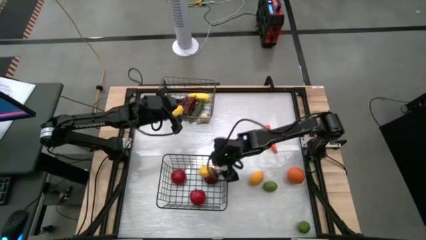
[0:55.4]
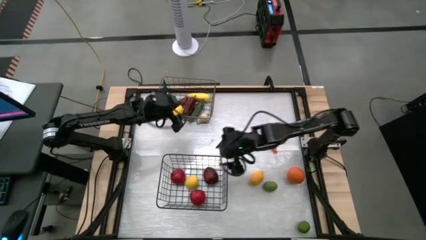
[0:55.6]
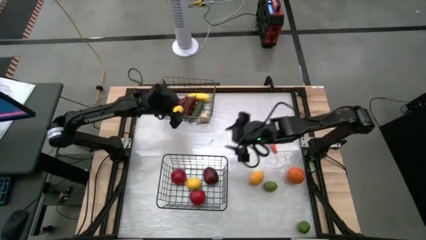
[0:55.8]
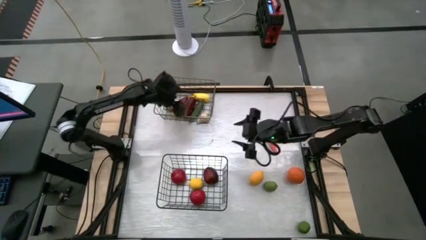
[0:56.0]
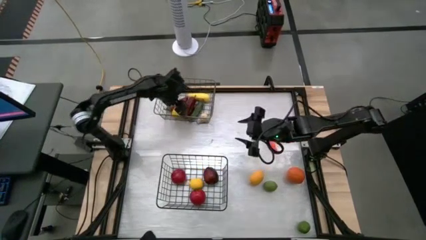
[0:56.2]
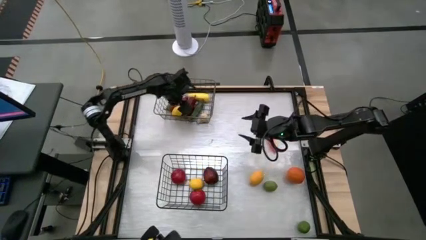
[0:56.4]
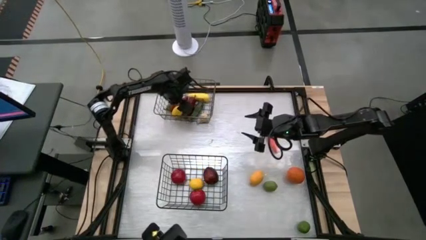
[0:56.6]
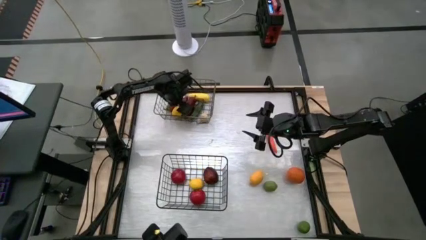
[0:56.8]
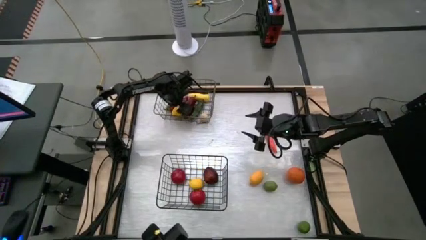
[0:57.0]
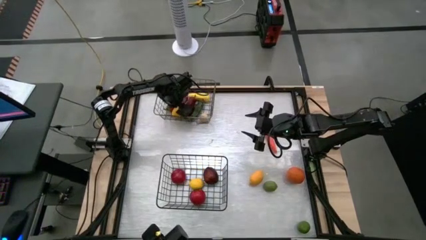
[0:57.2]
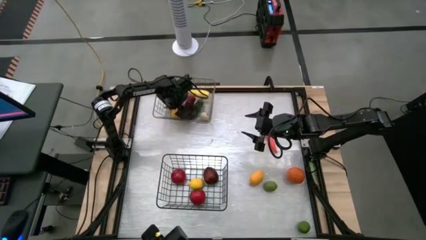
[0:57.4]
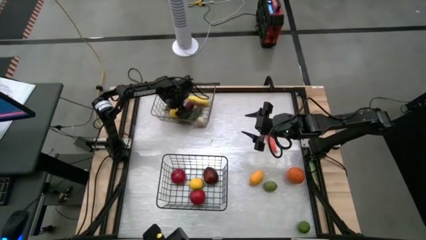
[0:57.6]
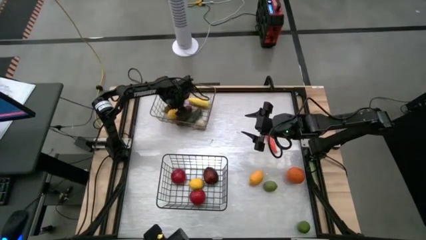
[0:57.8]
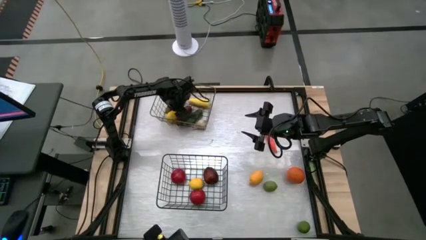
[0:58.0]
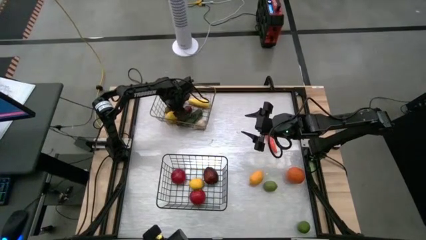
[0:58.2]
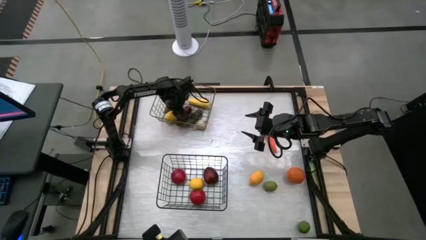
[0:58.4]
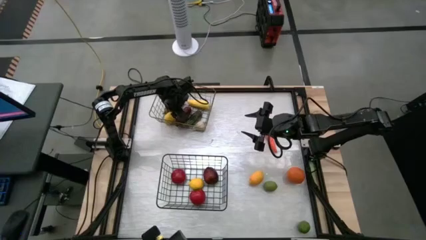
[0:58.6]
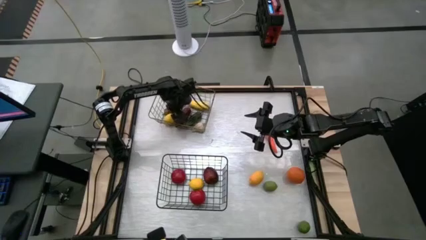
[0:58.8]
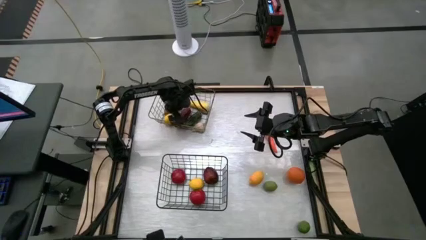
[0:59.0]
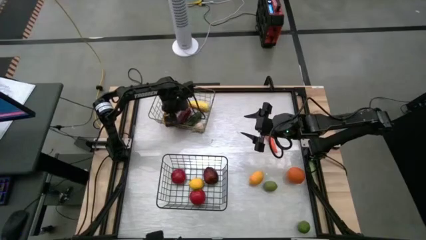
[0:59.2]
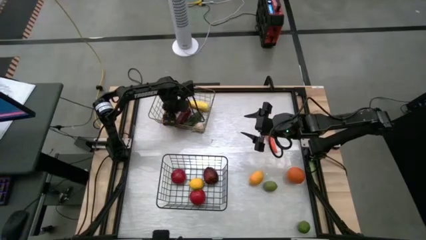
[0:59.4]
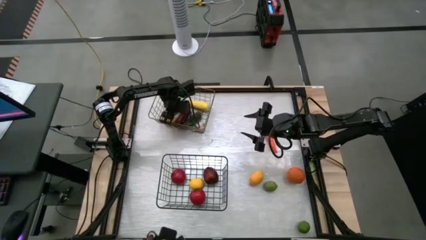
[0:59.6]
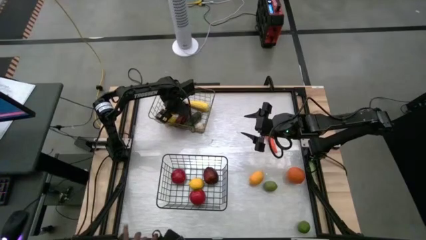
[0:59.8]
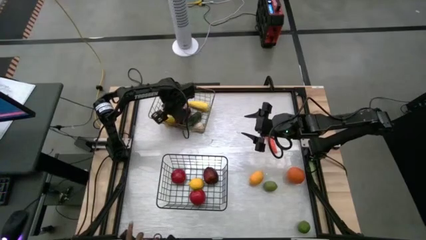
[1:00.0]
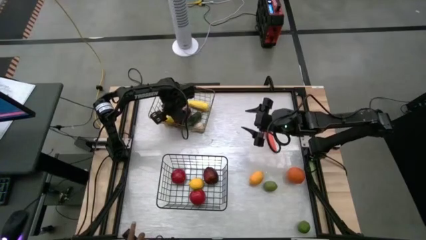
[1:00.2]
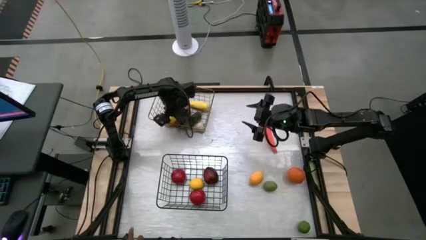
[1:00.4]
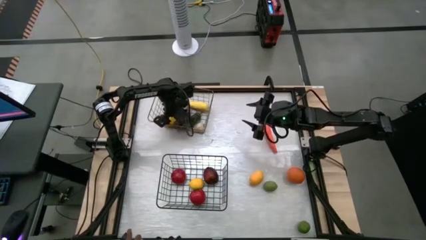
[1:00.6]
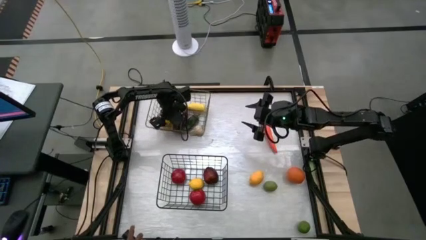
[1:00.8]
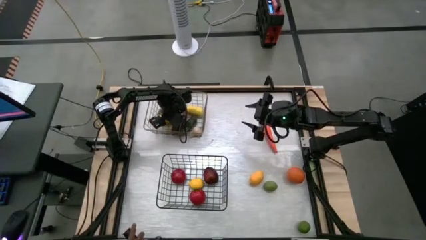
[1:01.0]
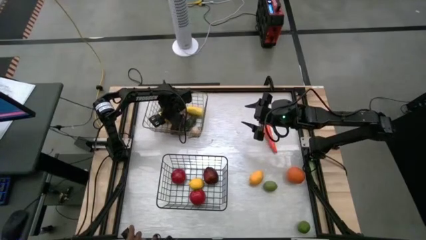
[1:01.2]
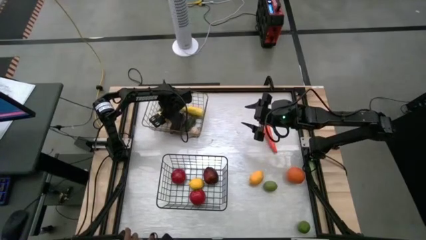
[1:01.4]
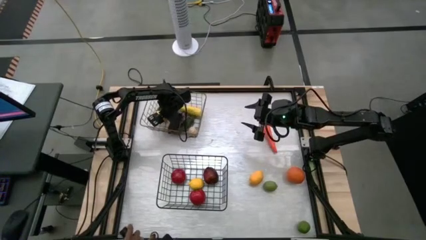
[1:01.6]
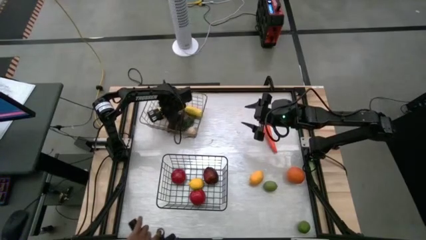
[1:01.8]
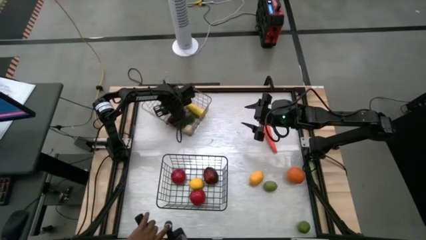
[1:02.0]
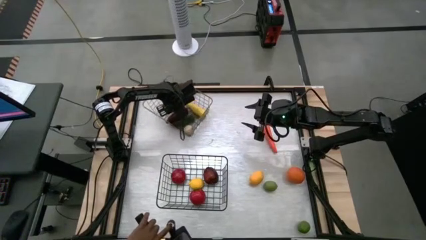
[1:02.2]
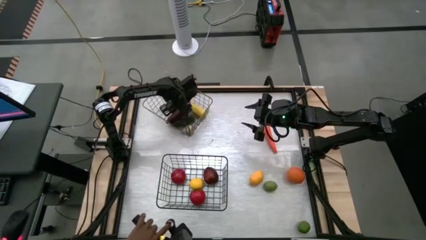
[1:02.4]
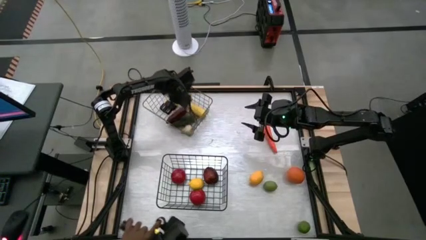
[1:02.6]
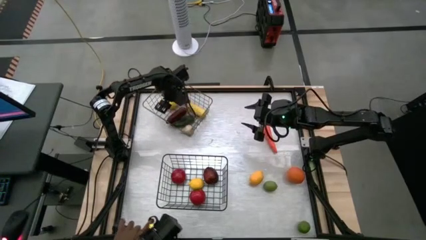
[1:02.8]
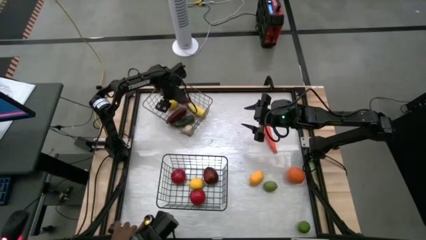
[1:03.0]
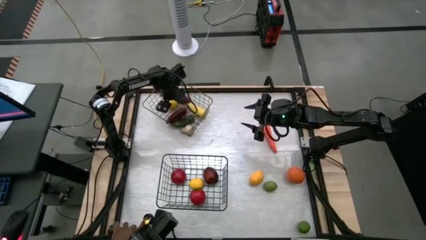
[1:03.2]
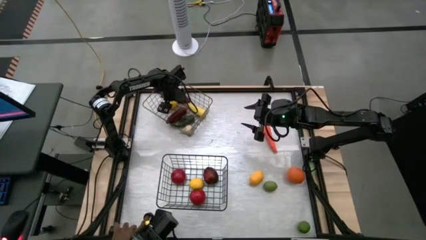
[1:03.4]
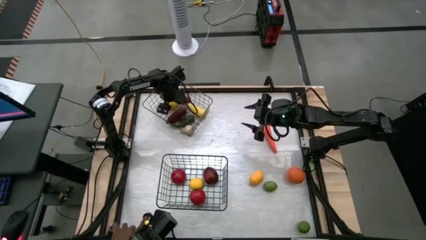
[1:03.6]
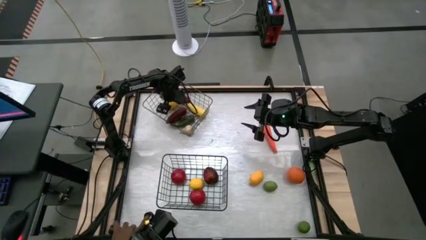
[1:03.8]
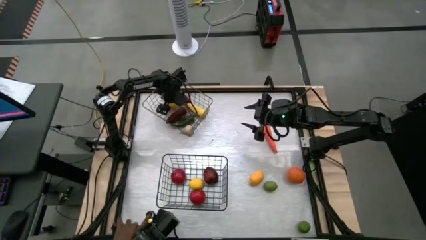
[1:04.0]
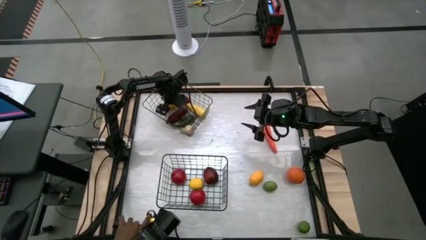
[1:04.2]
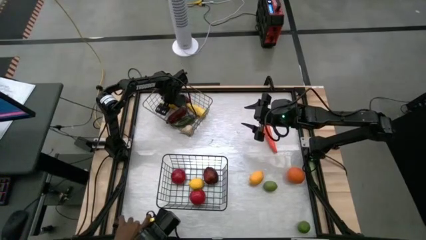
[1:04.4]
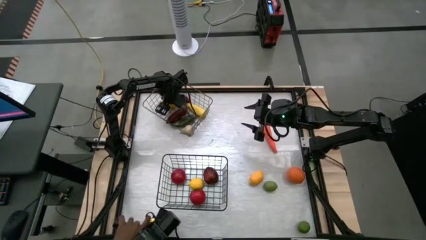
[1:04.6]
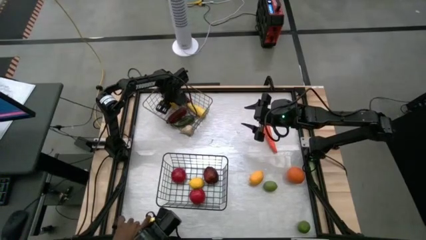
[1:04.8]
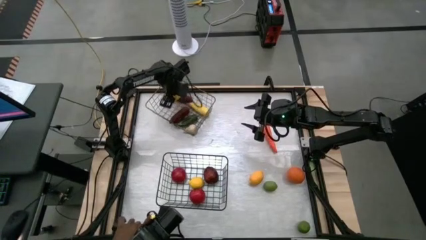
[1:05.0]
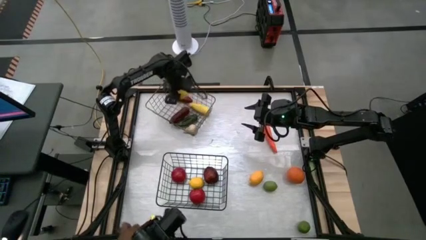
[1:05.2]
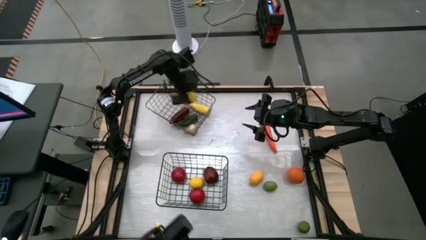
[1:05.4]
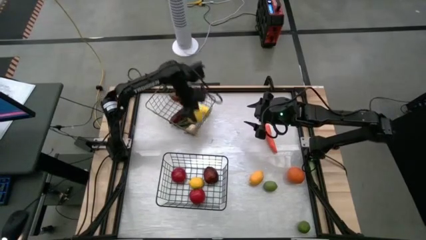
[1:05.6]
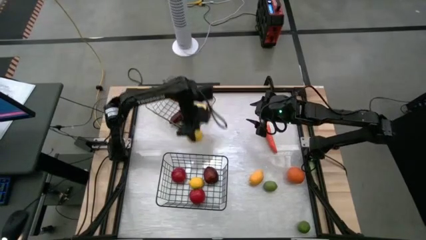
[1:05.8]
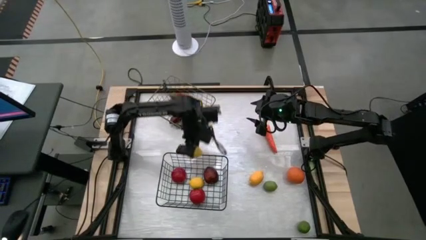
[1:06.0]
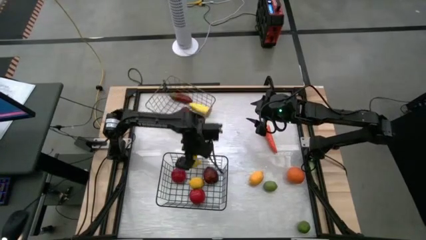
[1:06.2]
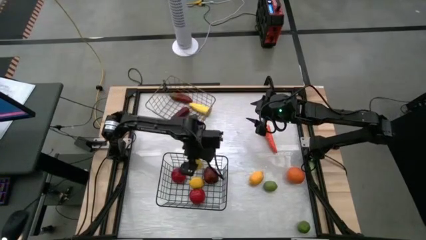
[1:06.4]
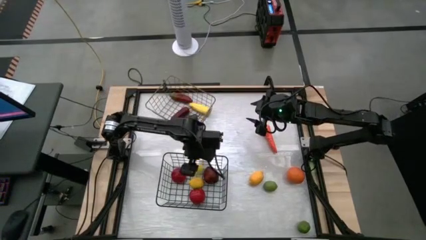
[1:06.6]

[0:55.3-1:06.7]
Task: Sort produce into baskets
Put the yellow lemon from top wire basket into the bottom wire basket

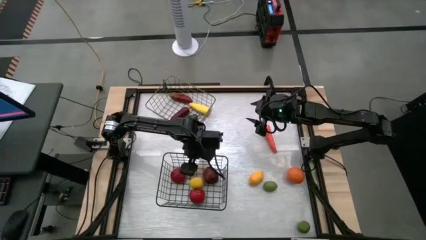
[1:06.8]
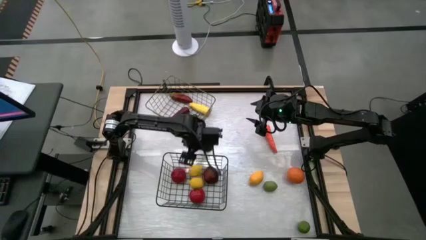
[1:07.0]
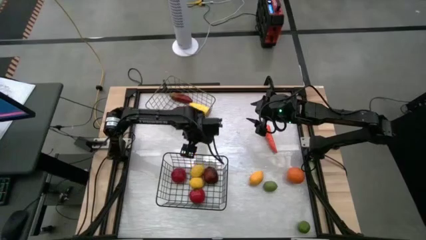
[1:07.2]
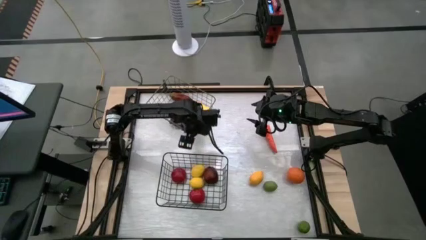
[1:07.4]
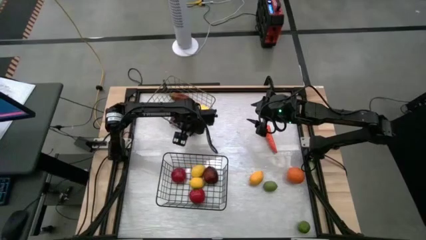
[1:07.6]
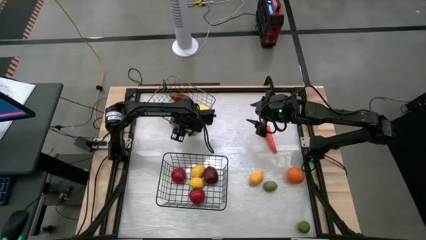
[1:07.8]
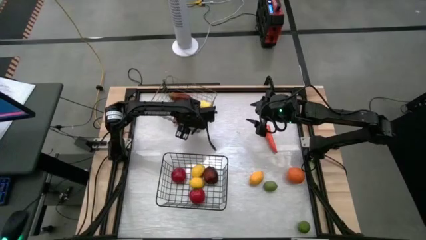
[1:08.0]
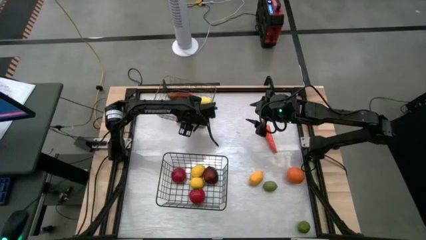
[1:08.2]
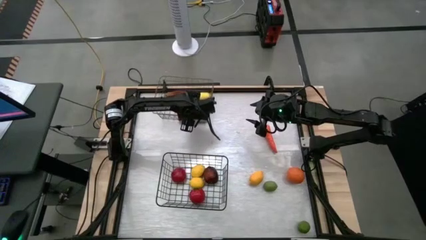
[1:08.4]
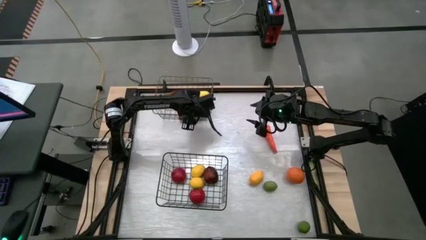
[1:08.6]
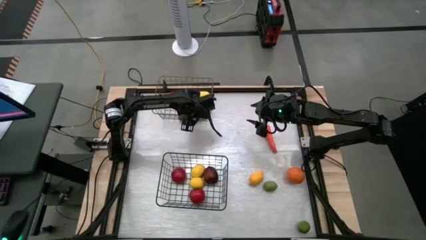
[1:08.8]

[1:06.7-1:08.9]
Adjust the top wire basket

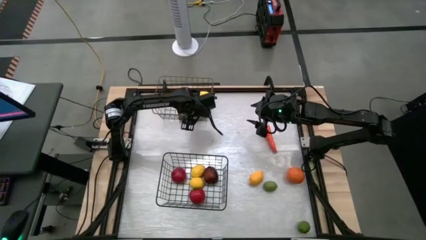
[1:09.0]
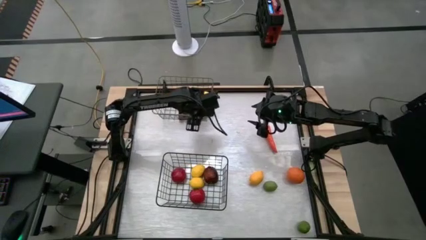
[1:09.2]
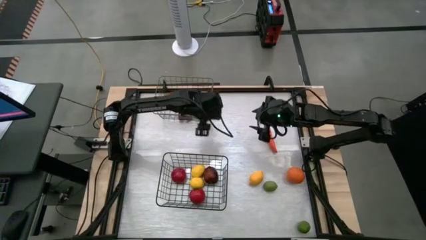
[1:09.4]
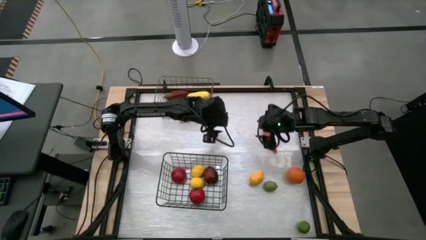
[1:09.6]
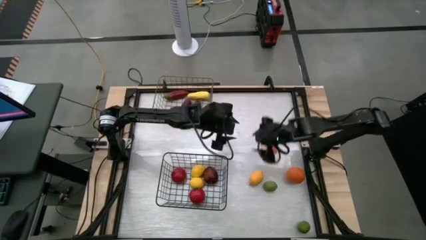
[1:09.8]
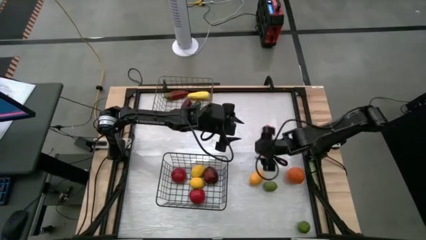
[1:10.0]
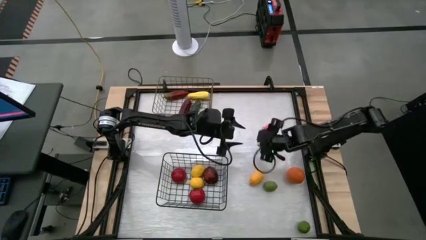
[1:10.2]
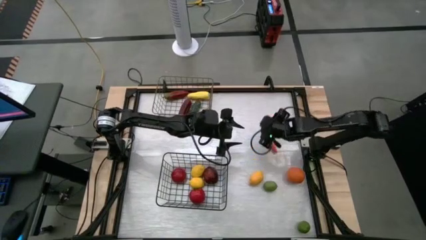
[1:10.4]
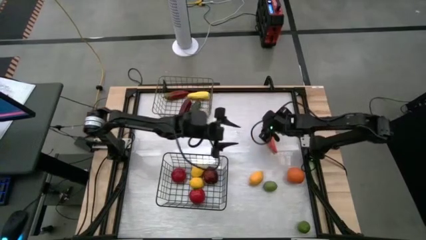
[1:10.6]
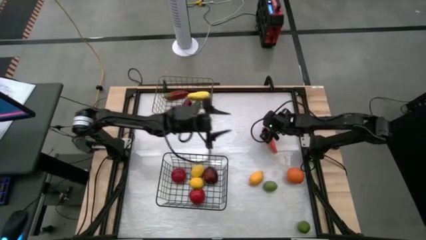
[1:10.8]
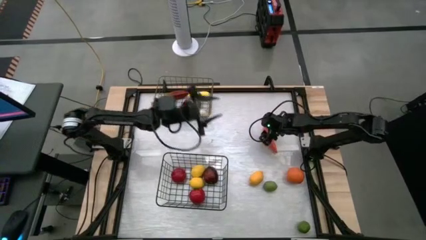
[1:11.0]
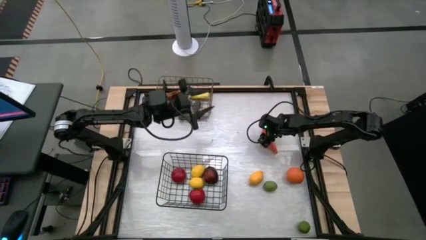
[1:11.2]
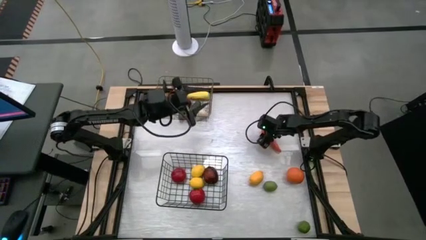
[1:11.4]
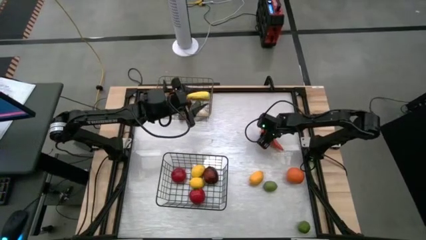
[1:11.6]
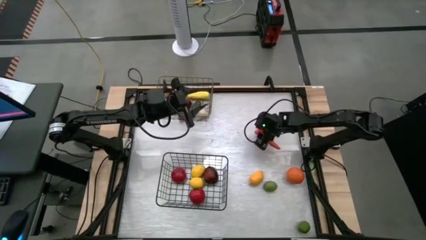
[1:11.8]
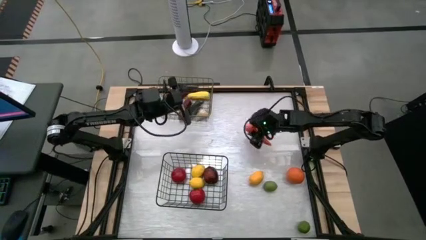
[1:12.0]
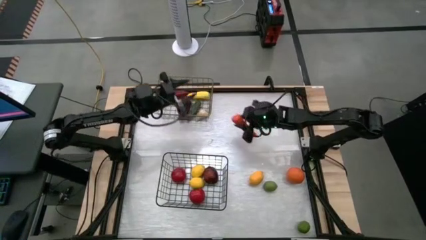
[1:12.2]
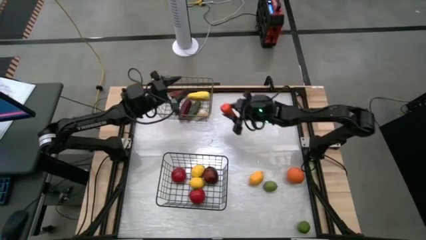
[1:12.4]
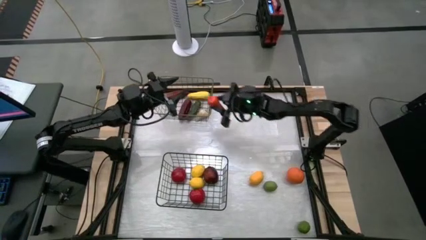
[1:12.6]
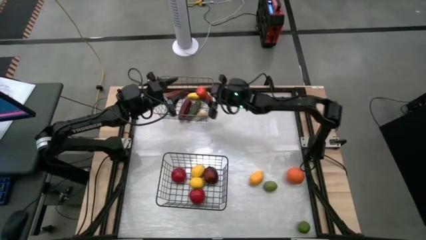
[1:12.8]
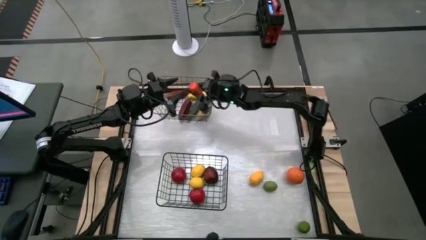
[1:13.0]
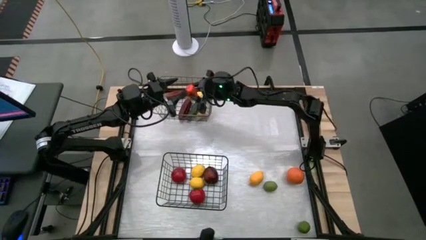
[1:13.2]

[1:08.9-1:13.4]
Put the orange carrot into the top wire basket
